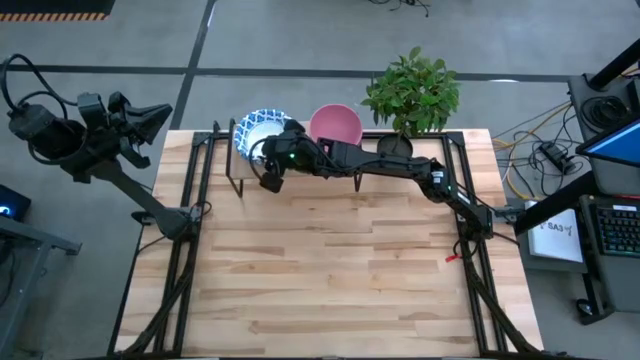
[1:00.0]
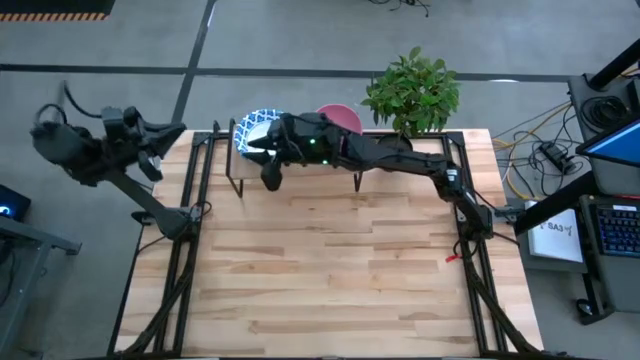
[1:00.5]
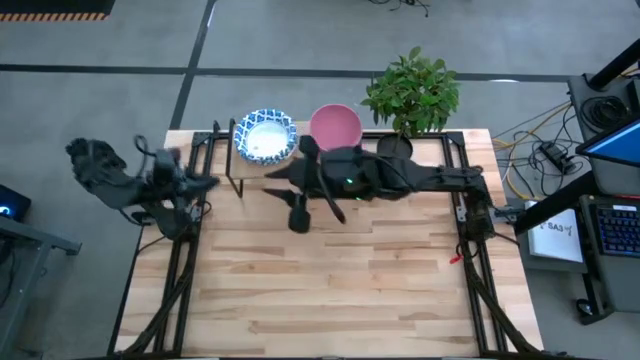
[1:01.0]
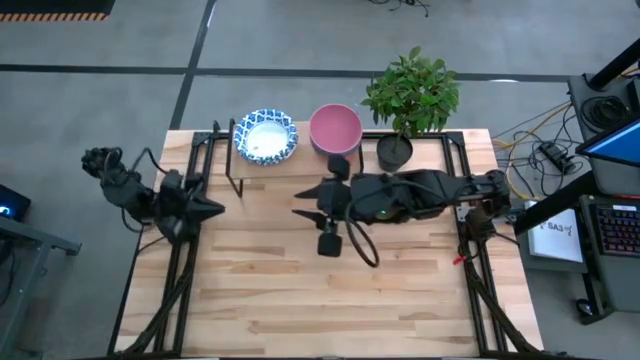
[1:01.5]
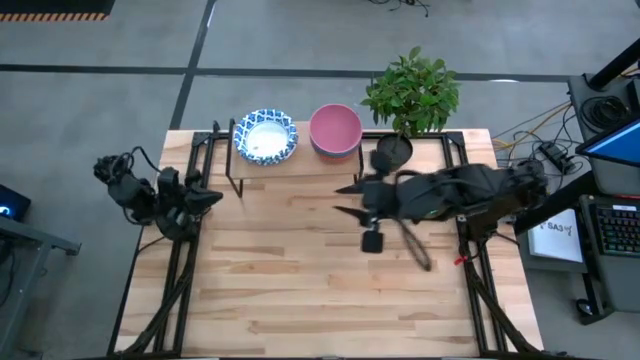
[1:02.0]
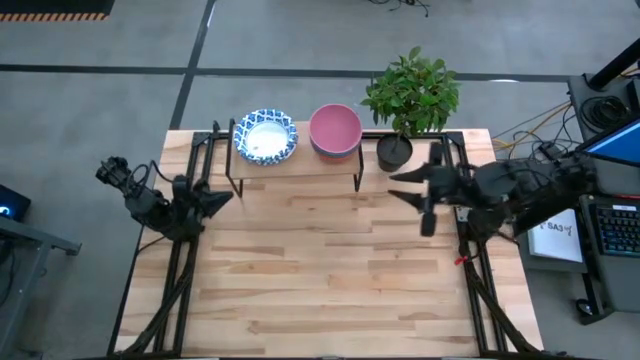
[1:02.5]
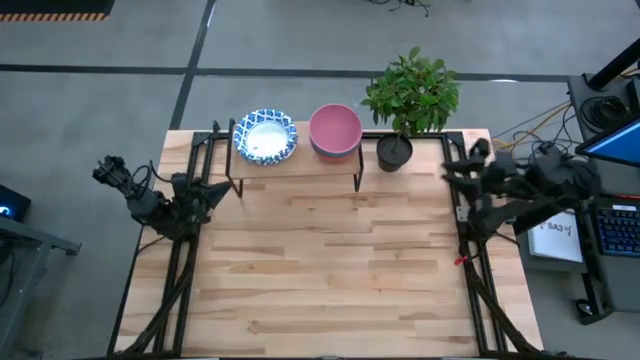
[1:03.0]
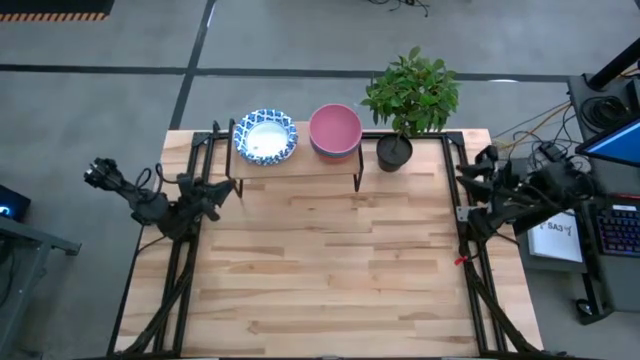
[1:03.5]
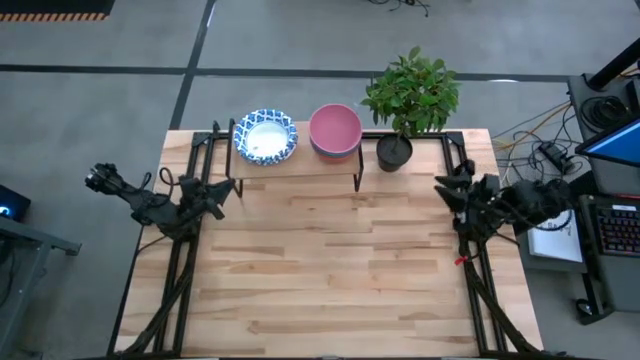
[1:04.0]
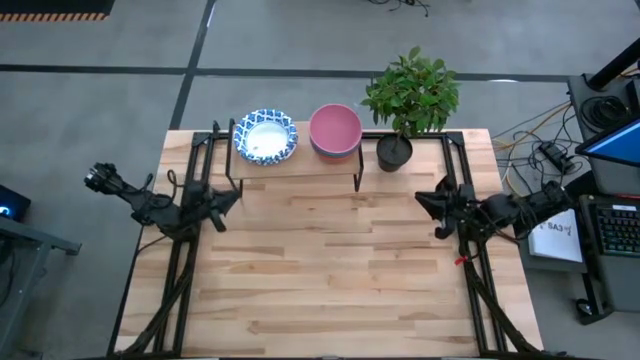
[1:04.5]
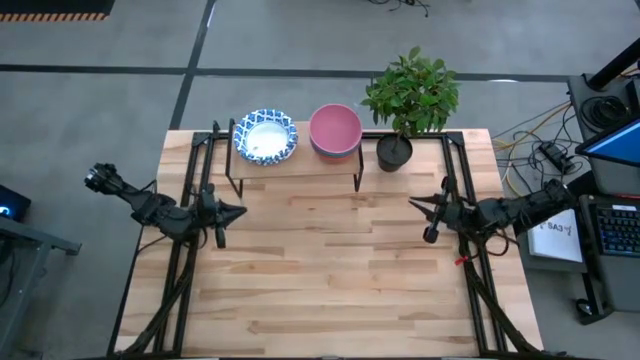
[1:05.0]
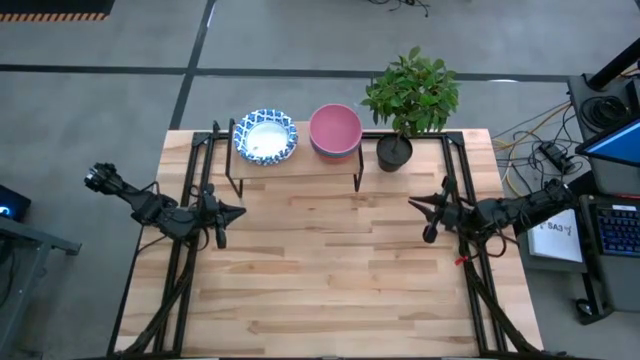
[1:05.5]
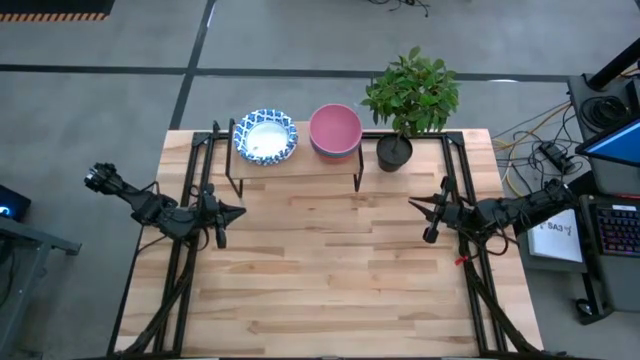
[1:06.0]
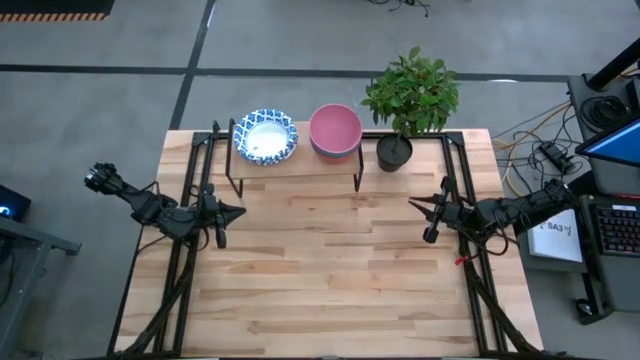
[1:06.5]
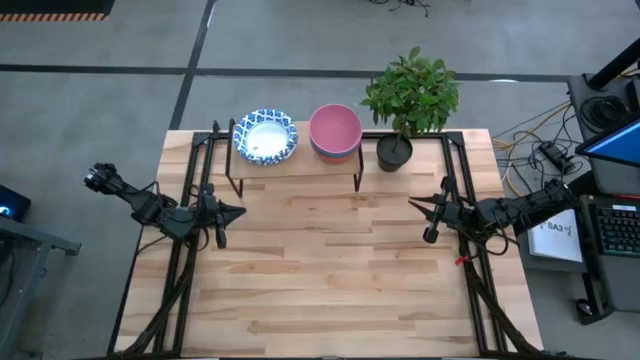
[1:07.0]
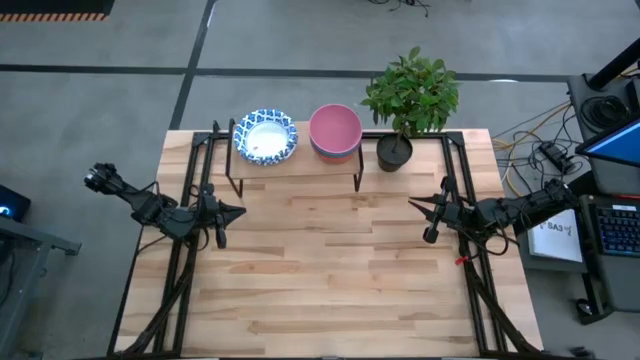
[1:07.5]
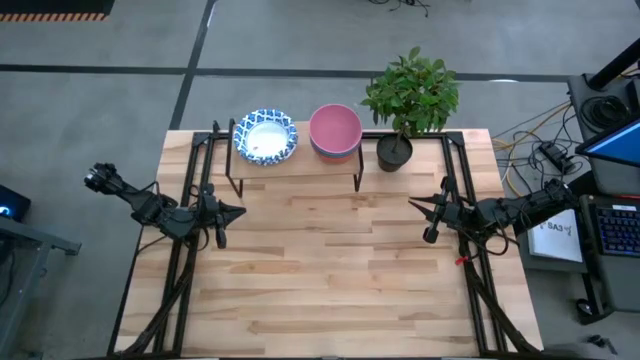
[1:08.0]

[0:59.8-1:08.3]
Task: Place and stack bowls onto a shelf
Return to Home Position

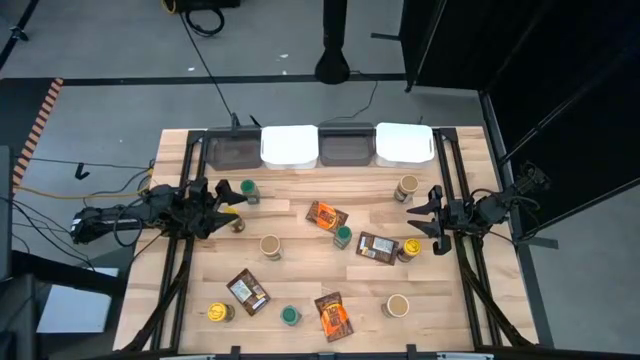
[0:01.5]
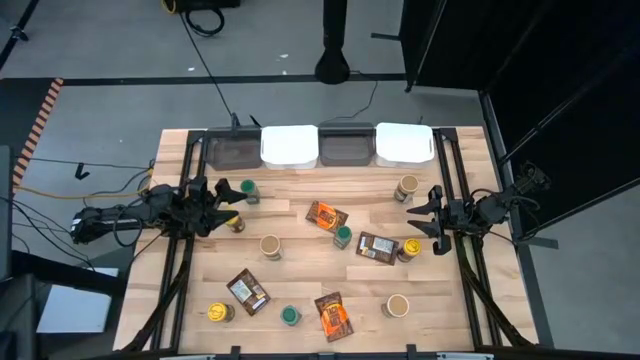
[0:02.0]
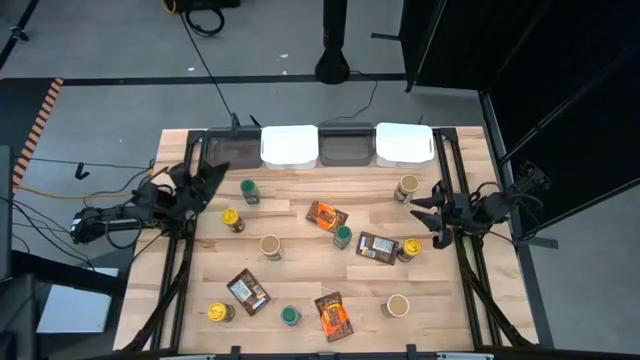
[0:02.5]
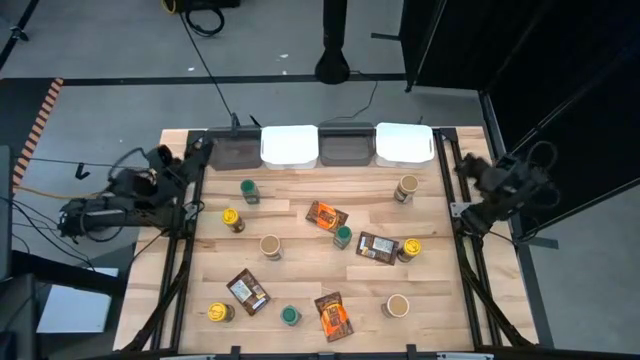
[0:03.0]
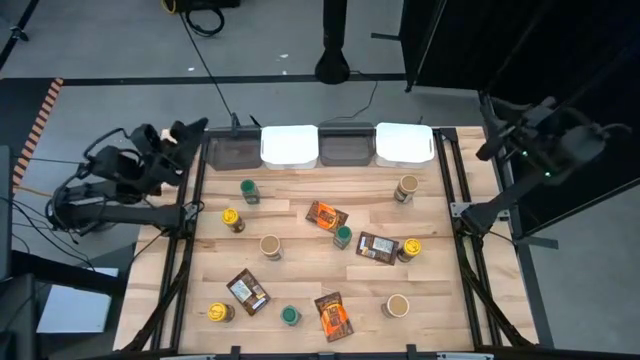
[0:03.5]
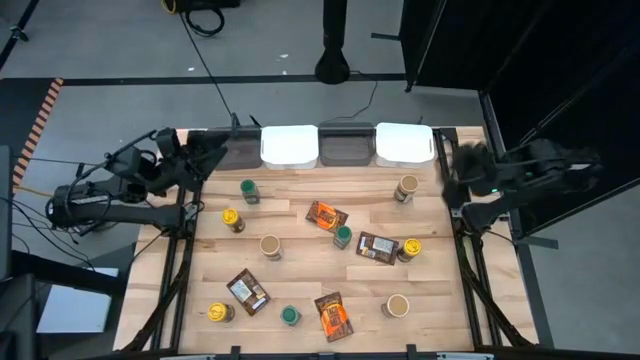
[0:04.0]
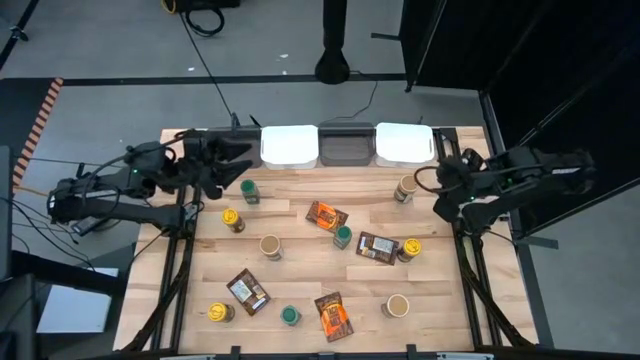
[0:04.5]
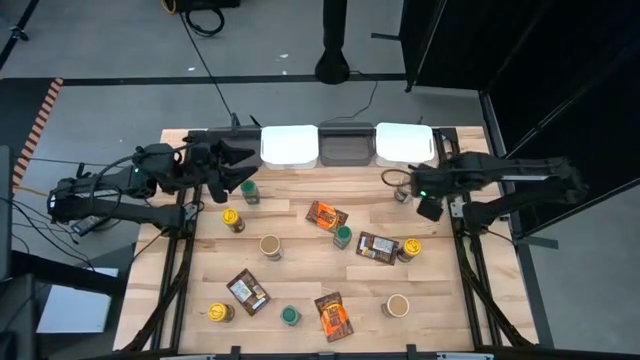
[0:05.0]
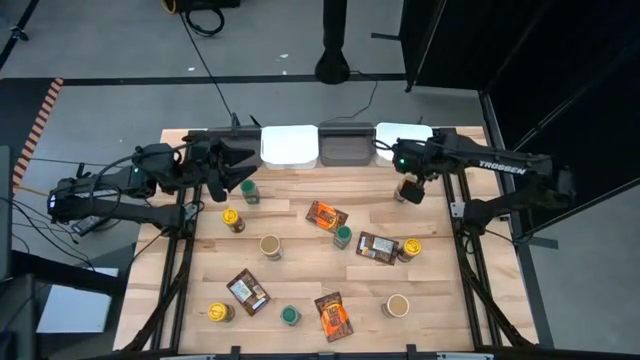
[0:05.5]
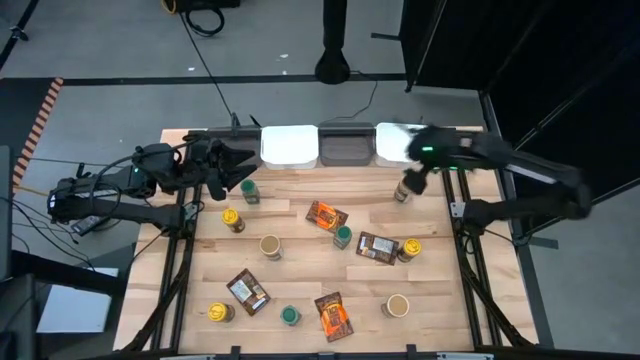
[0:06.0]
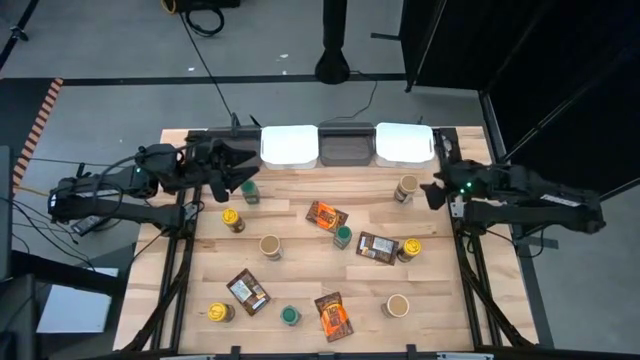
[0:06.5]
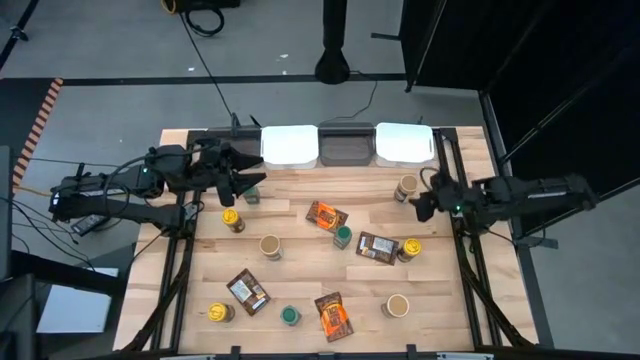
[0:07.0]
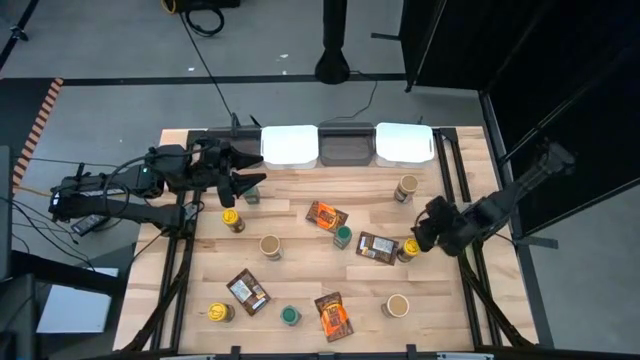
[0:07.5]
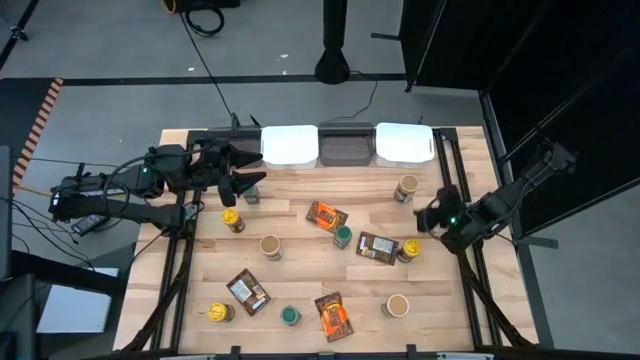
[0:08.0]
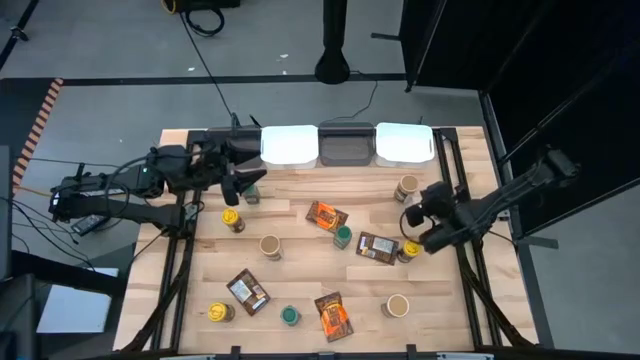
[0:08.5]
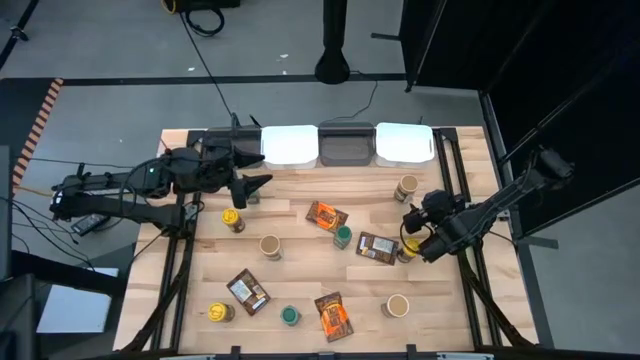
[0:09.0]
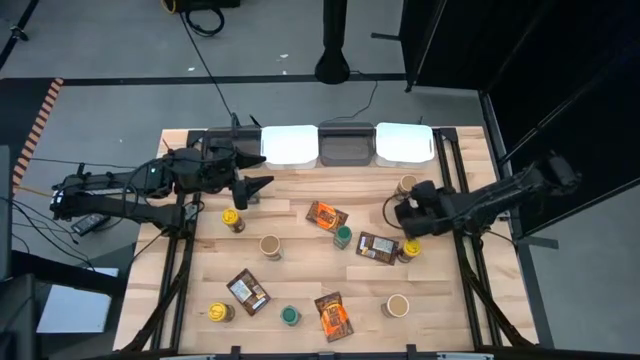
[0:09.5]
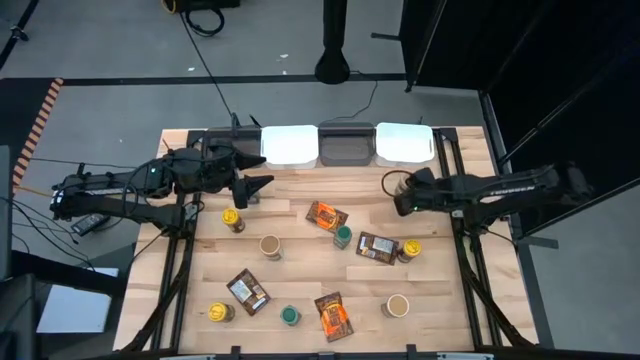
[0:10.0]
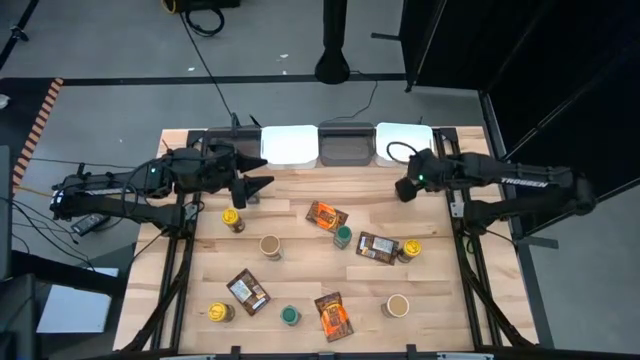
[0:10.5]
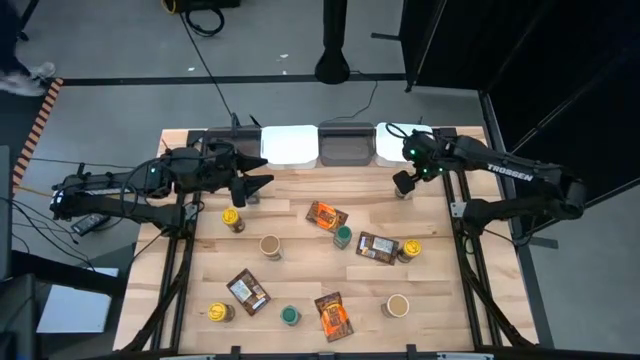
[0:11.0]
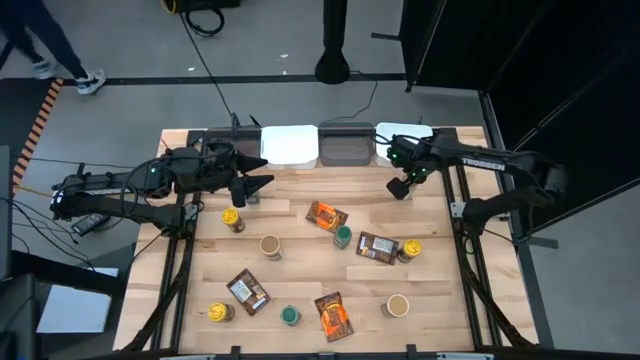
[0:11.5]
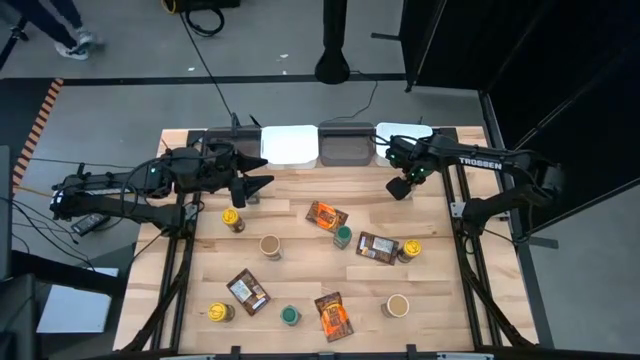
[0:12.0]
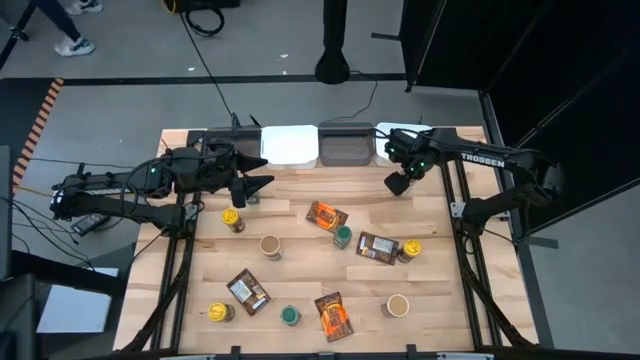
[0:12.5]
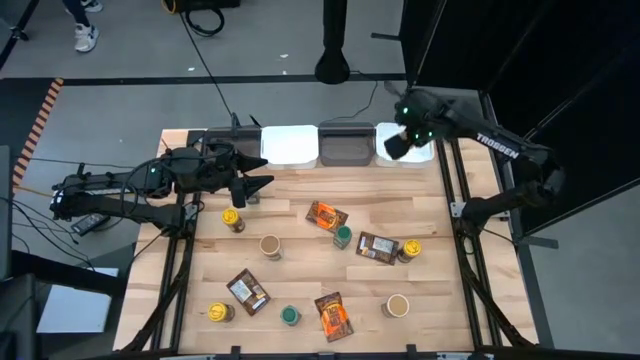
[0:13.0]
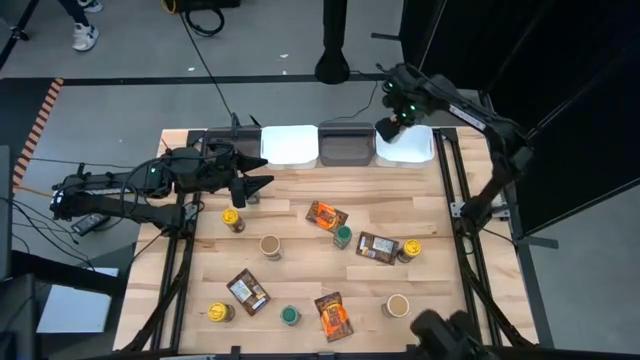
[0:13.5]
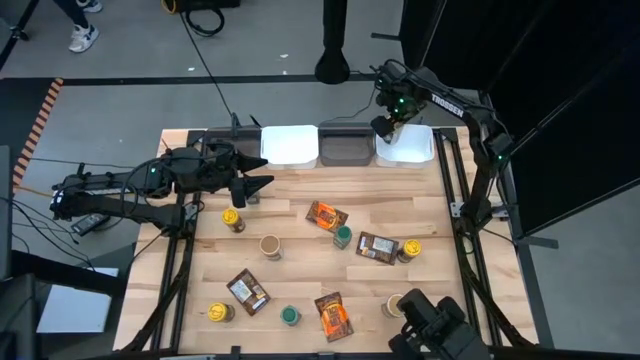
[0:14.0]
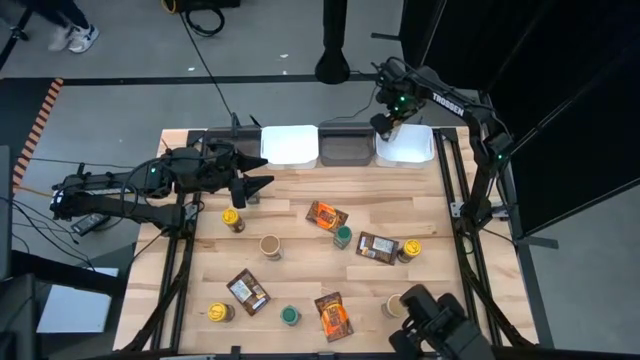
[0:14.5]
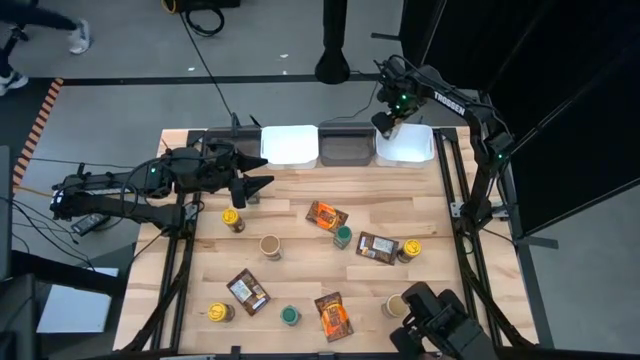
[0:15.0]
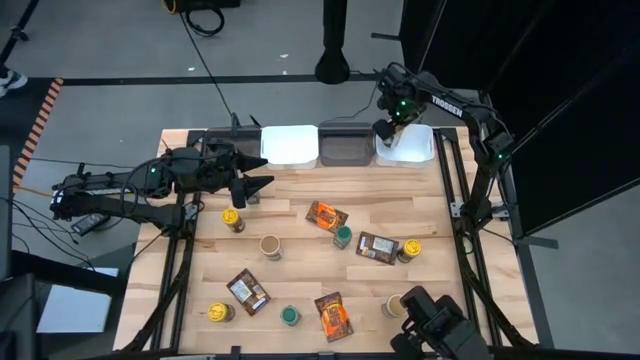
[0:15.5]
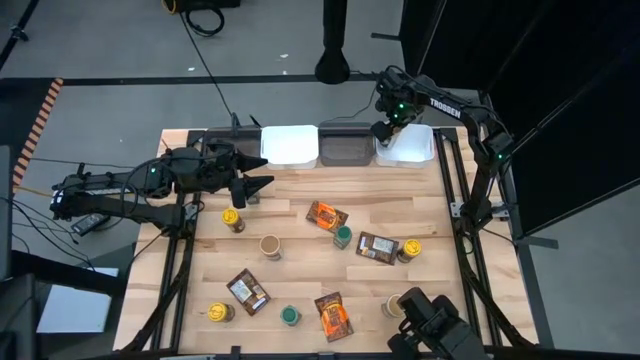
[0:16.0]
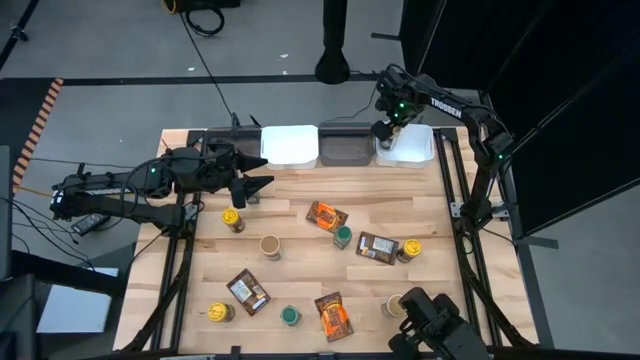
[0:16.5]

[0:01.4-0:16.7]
Task: Sort spices by type
Put the top right brown seasoning bottle into the right white bin
